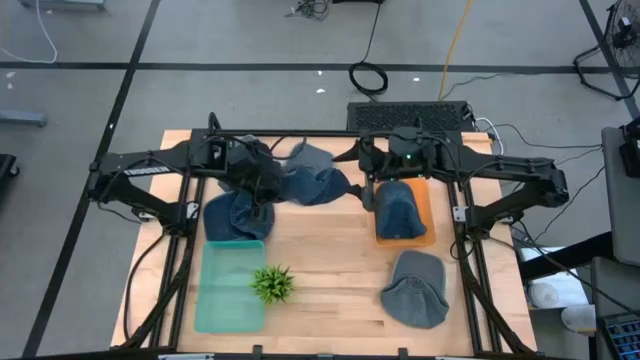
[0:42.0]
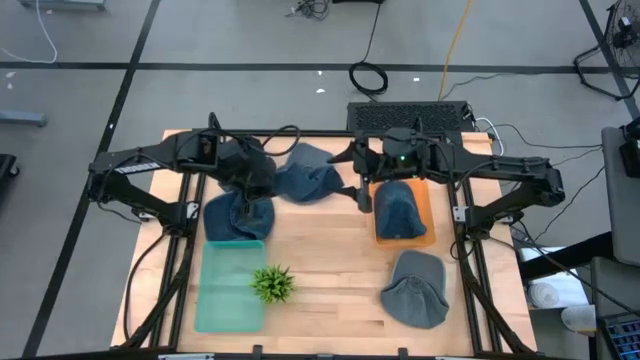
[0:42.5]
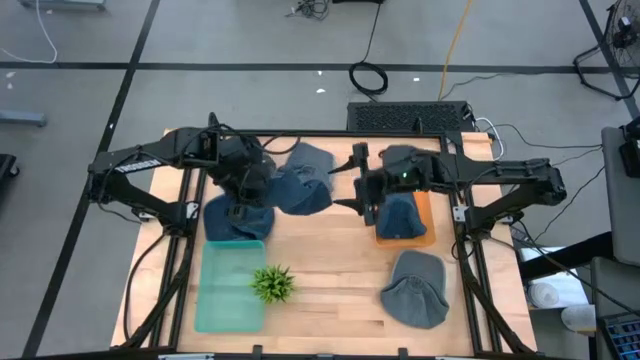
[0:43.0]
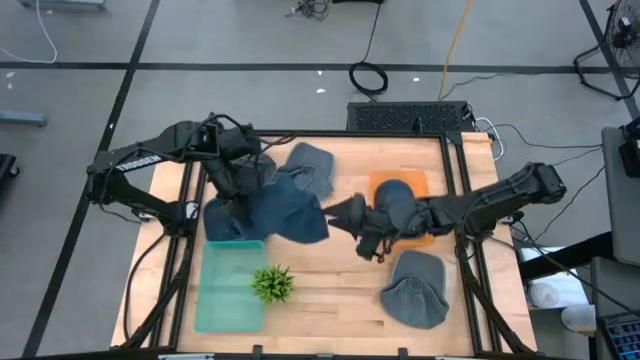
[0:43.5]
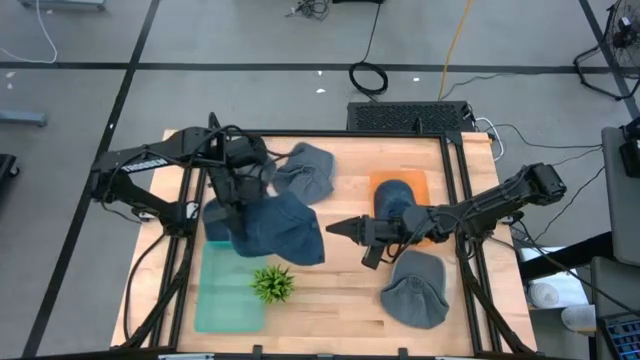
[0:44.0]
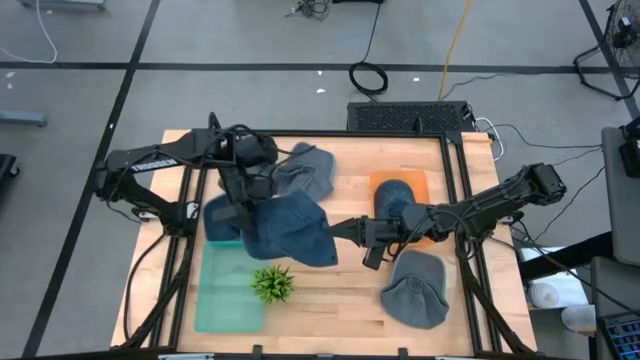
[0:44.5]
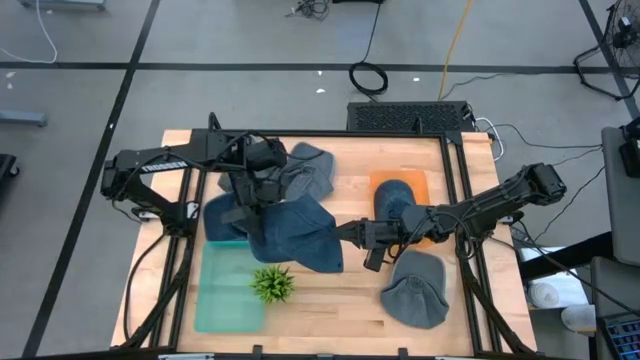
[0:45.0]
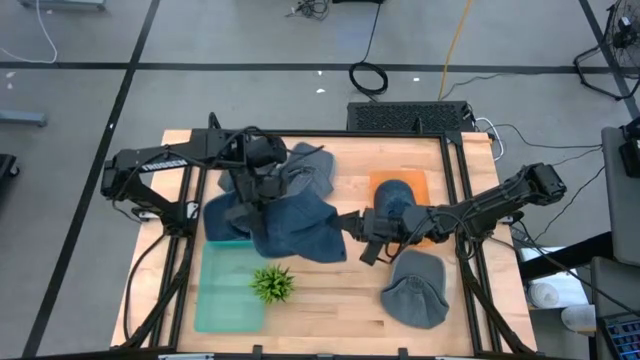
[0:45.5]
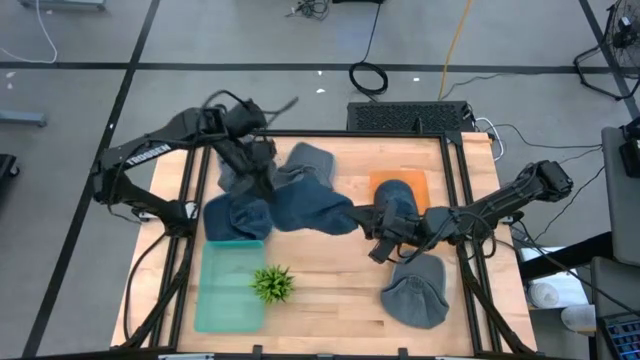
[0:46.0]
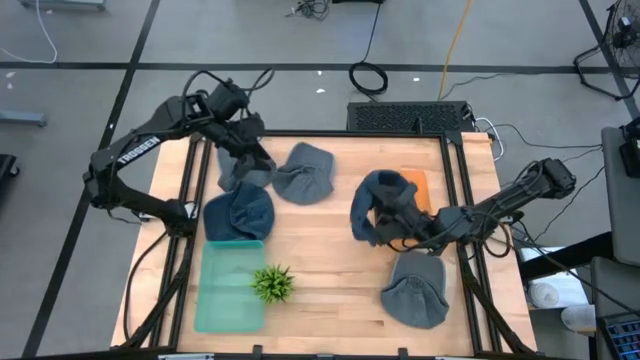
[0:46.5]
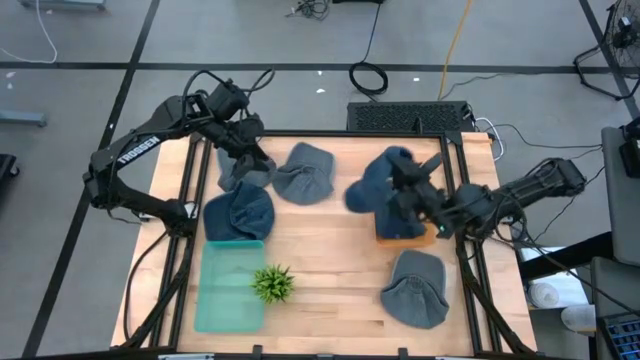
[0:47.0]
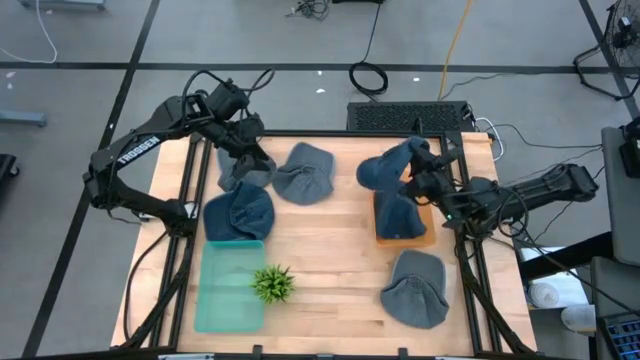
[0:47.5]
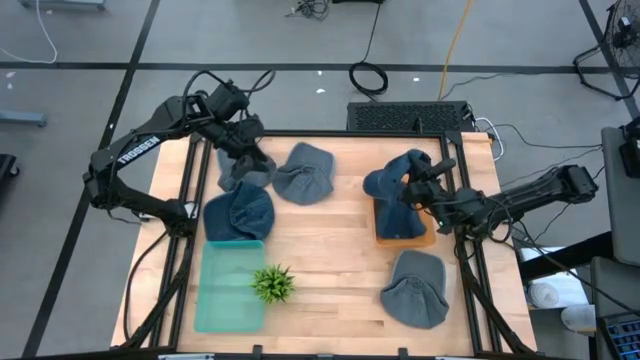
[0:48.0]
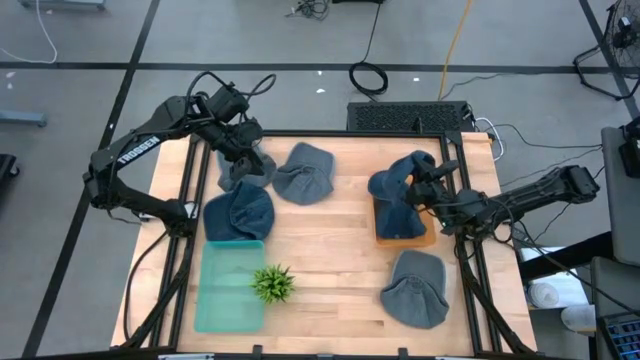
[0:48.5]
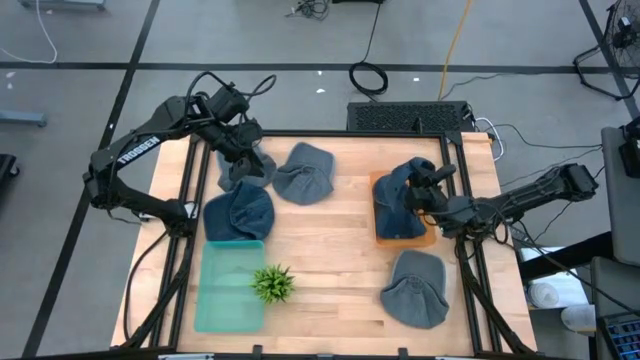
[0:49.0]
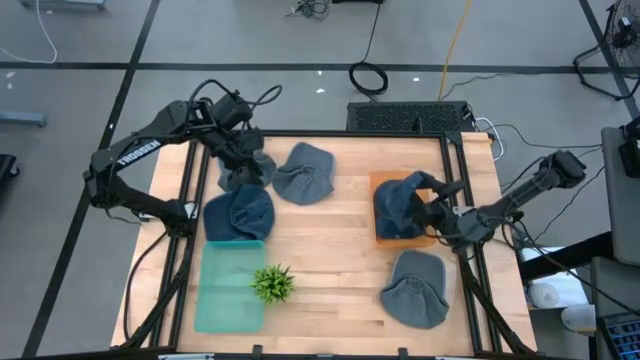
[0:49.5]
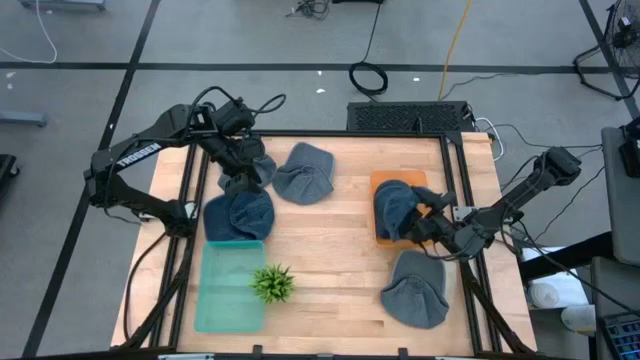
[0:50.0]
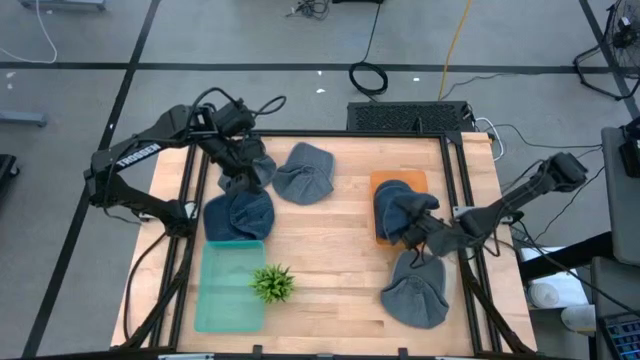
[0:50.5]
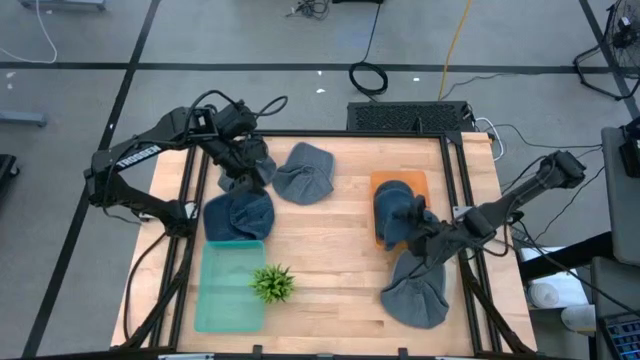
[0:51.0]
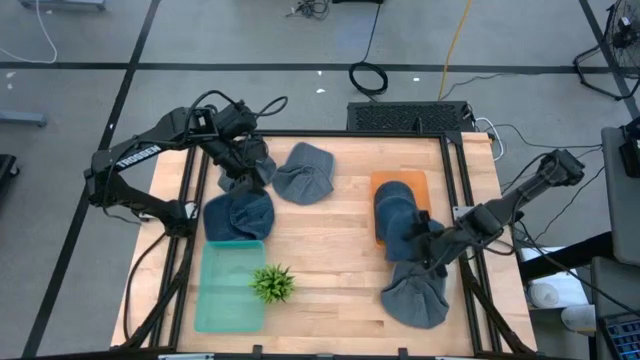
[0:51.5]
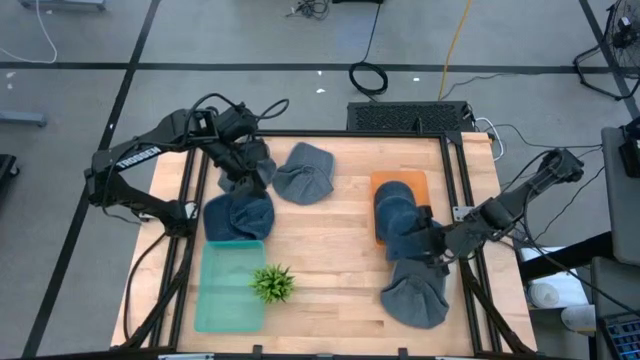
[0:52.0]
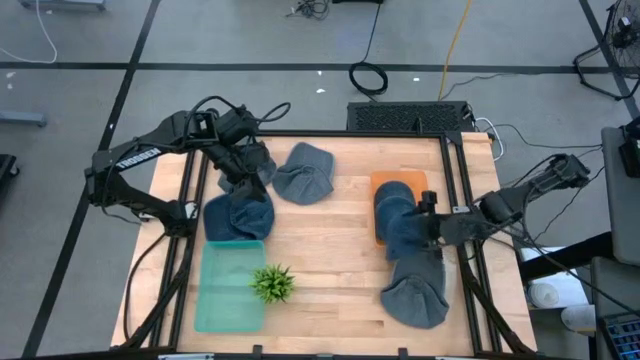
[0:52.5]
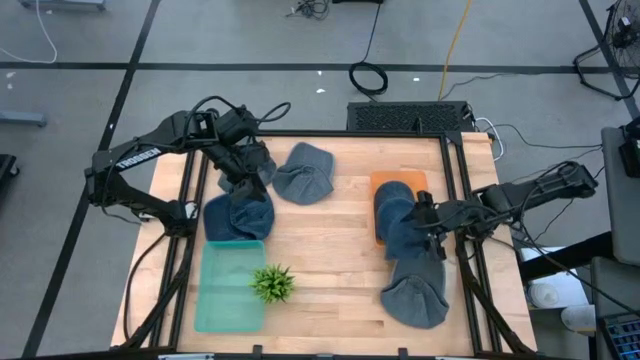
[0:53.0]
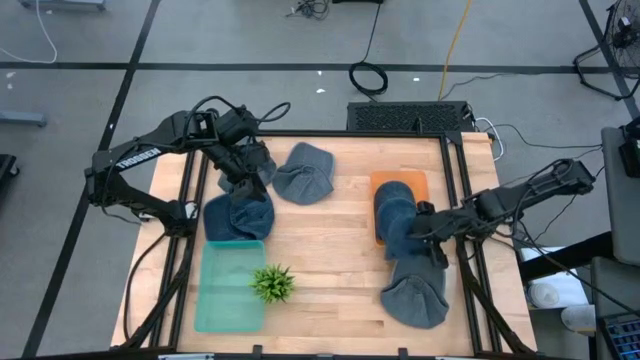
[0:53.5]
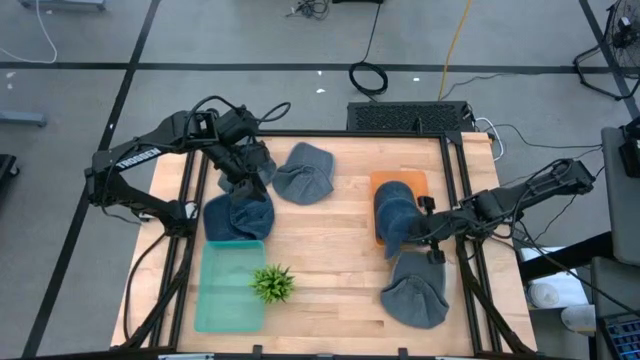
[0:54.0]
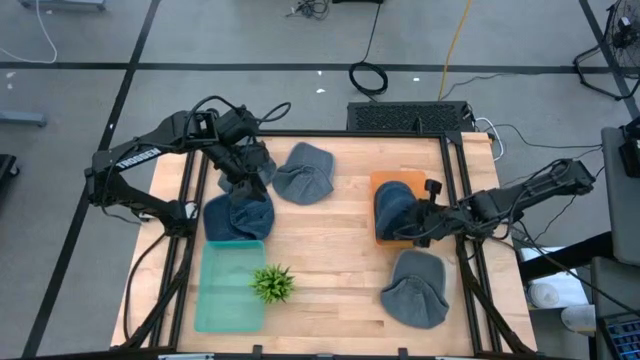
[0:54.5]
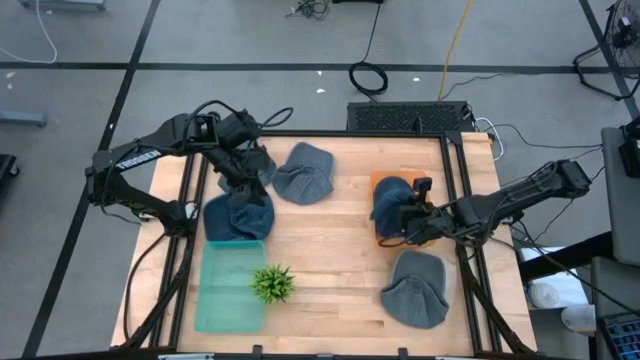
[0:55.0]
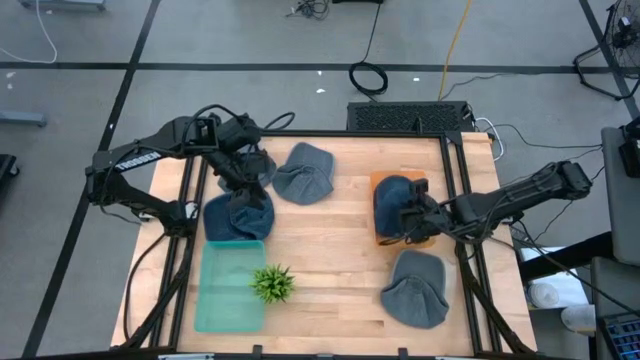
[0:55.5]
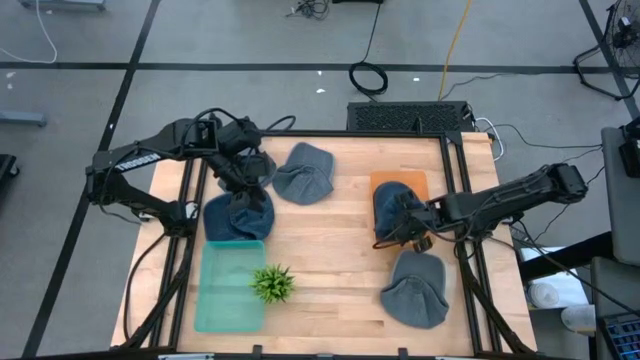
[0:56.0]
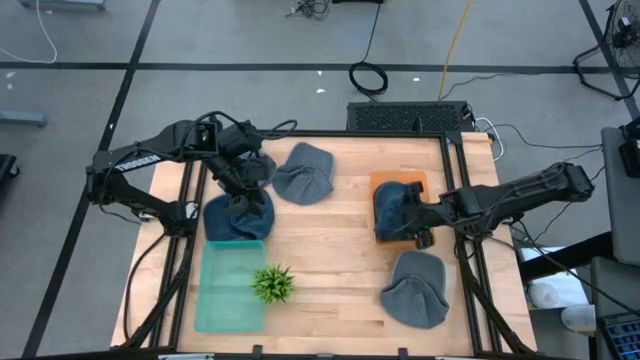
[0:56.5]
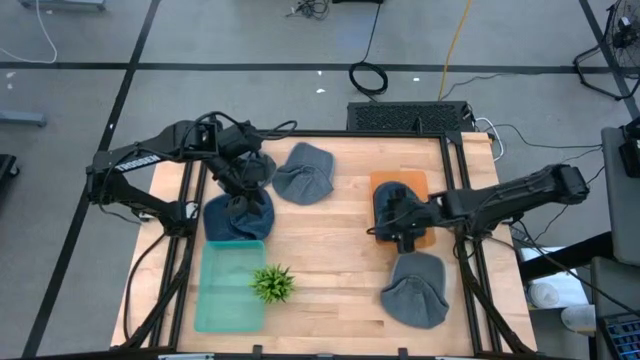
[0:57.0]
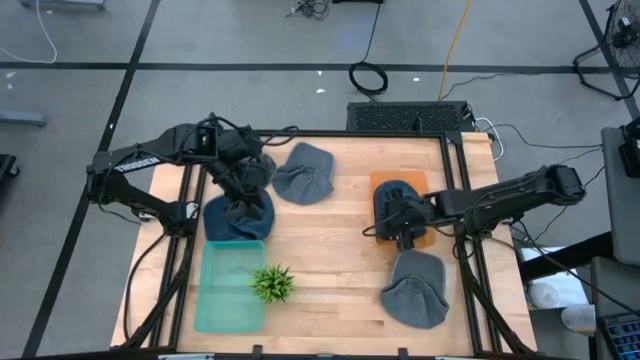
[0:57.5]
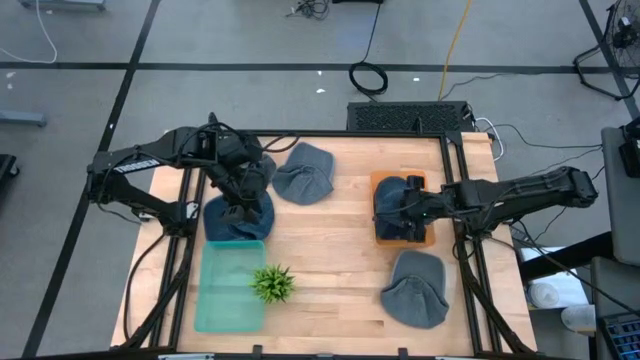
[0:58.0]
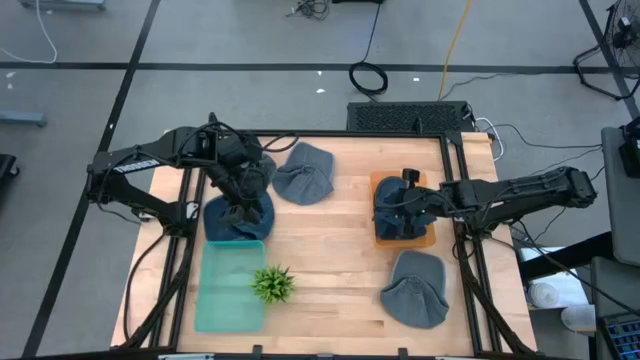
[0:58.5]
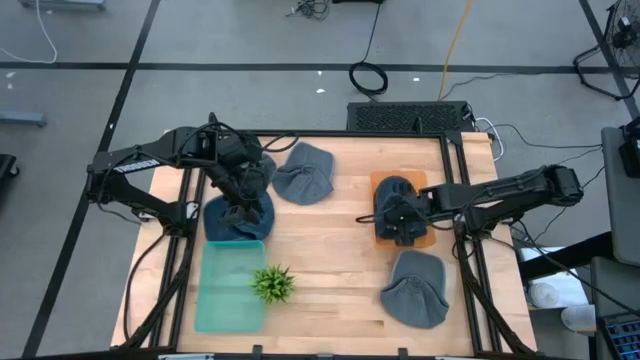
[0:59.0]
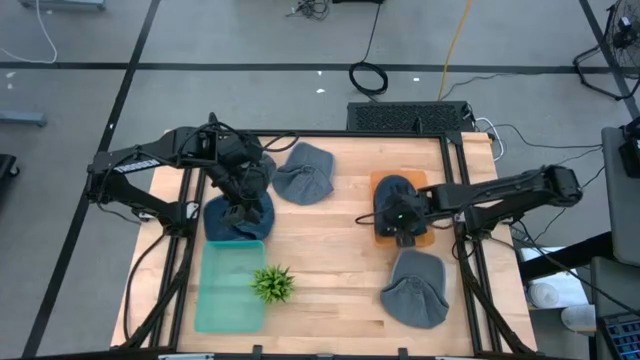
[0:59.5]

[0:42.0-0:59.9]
Task: Pick & Place hat
Put the right blue cap into the orange bin

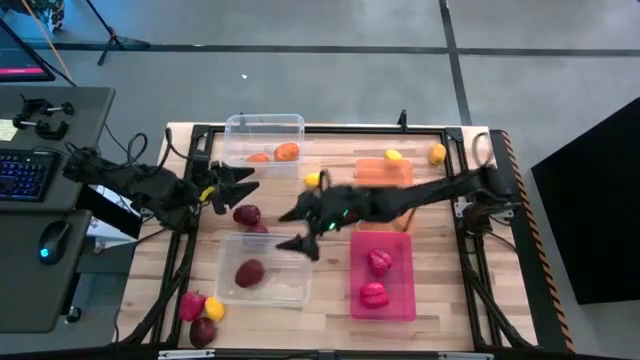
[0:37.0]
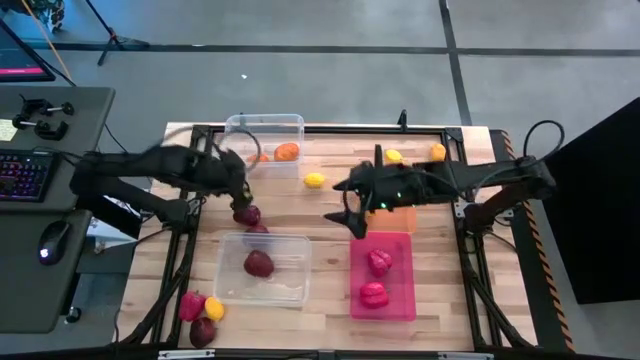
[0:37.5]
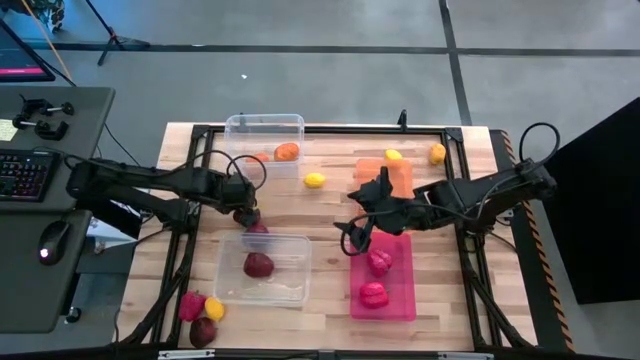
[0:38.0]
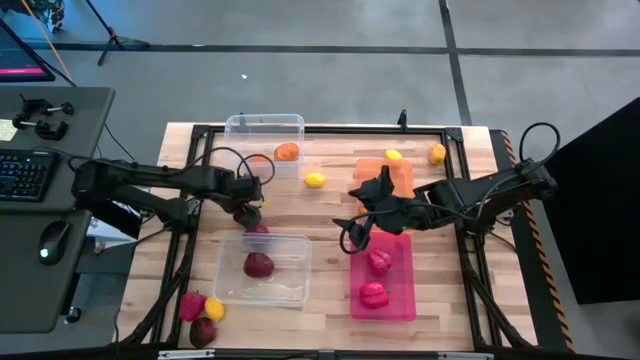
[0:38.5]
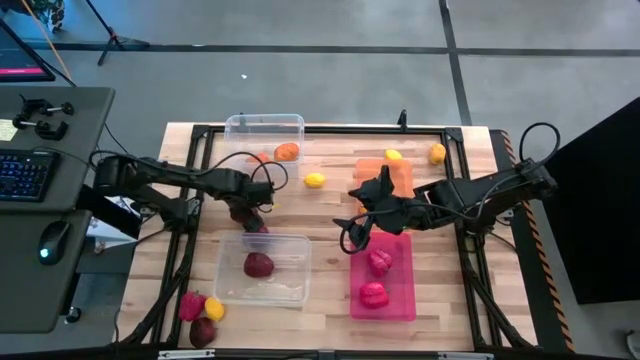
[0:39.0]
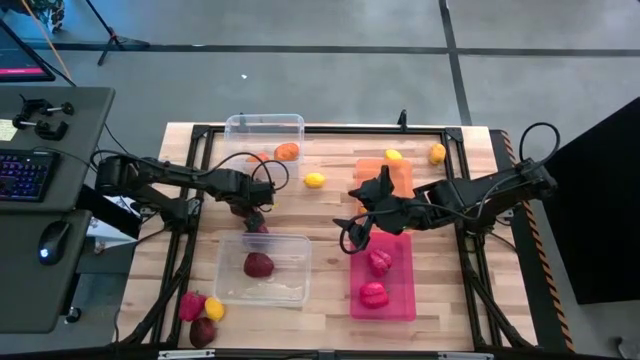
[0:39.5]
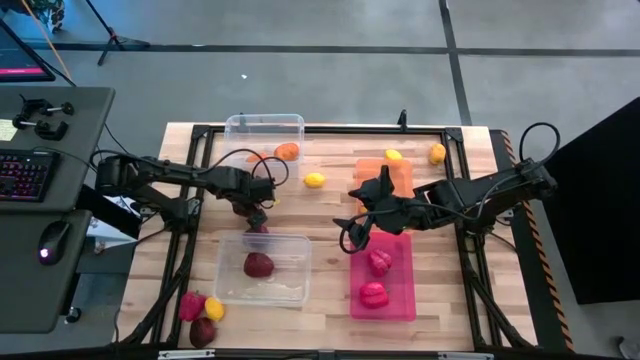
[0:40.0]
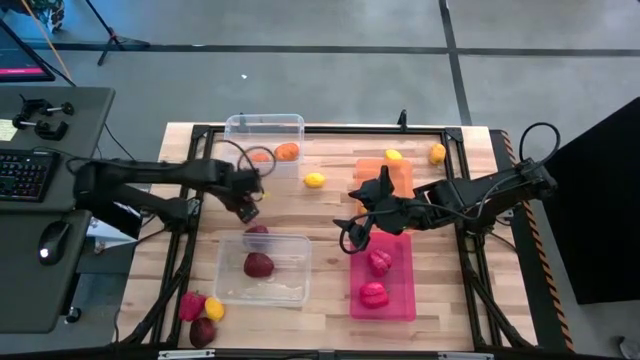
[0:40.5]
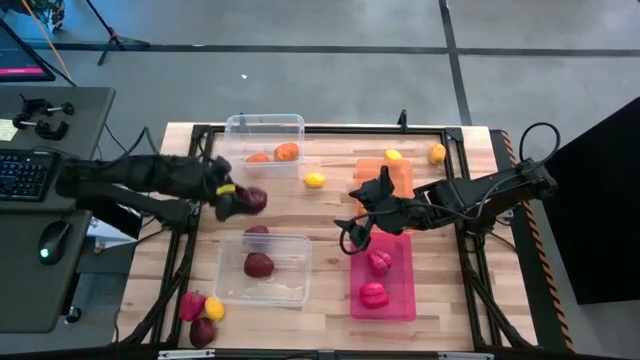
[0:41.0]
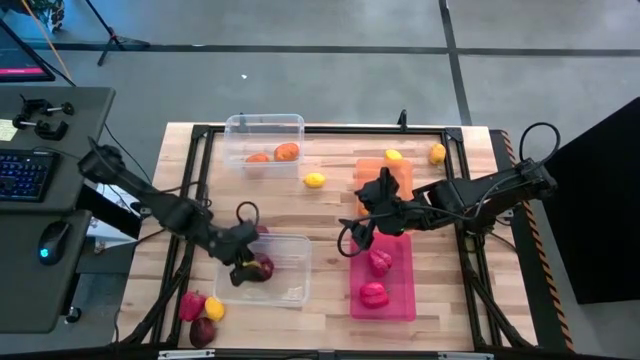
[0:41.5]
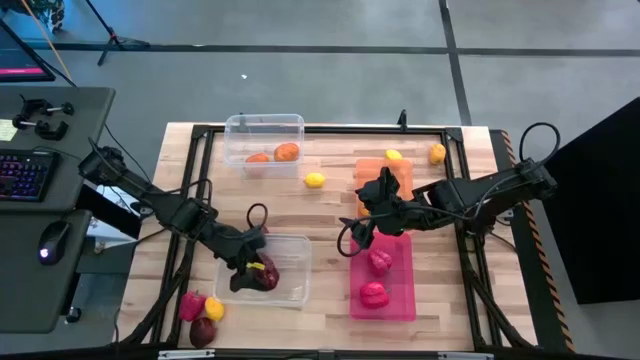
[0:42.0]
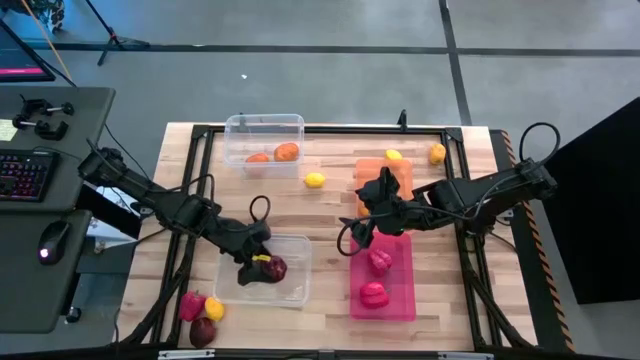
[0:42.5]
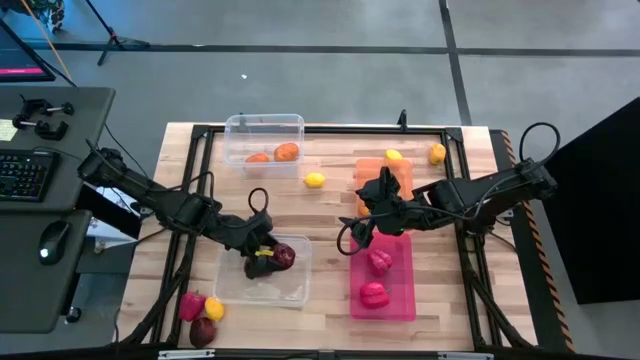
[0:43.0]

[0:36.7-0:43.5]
Task: Sort produce into baskets
Put the red apple into the bottom transparent bin
